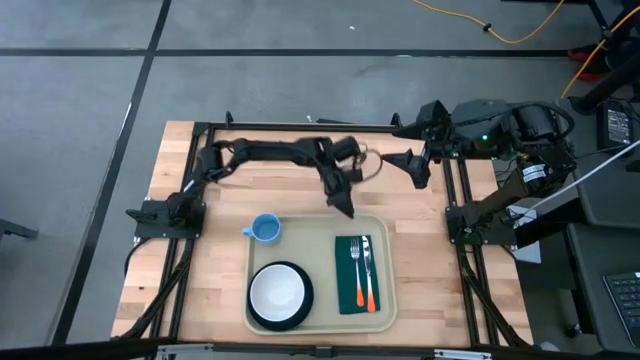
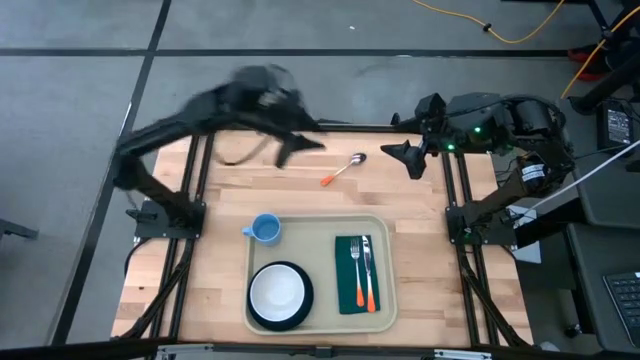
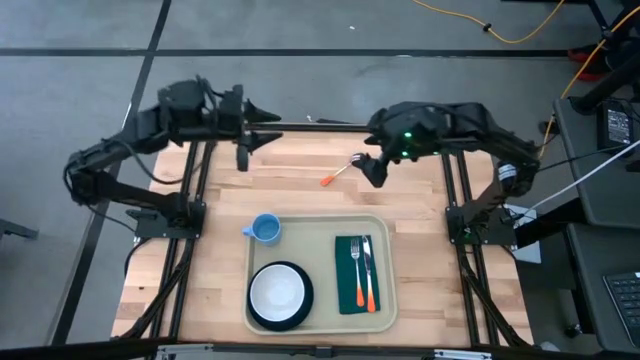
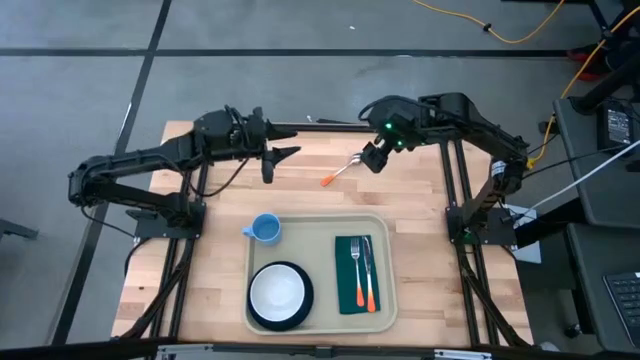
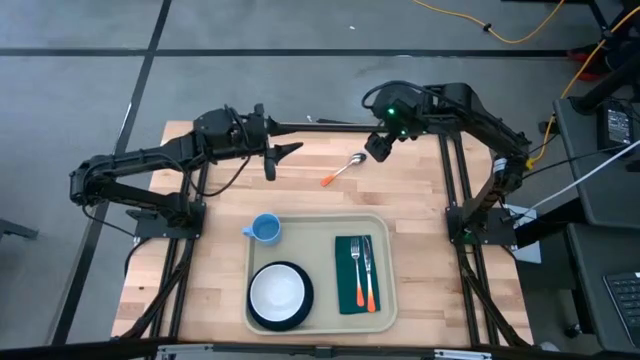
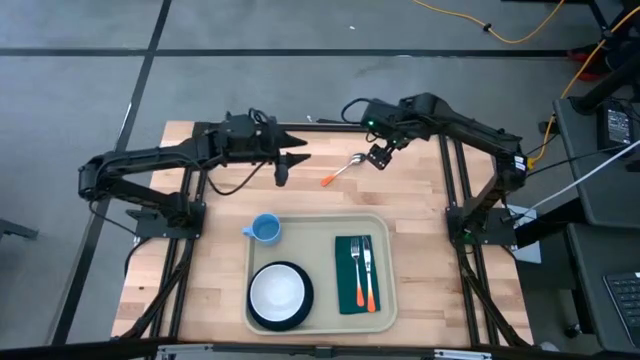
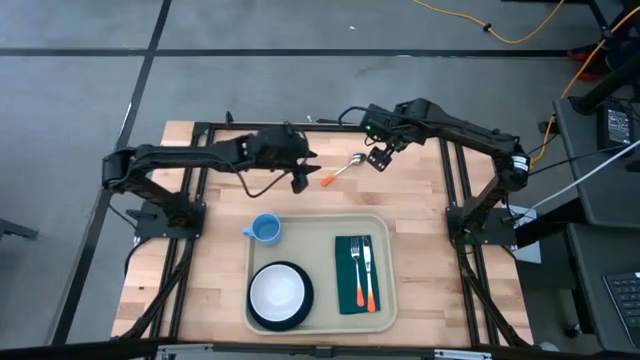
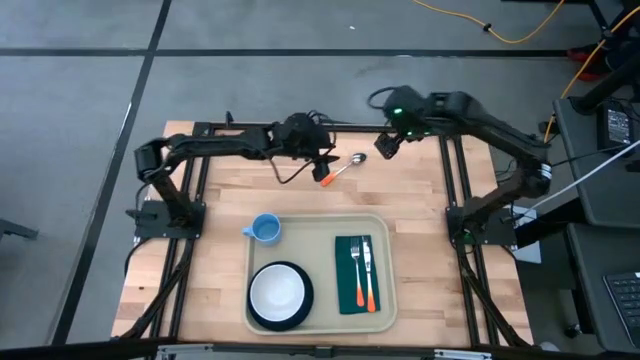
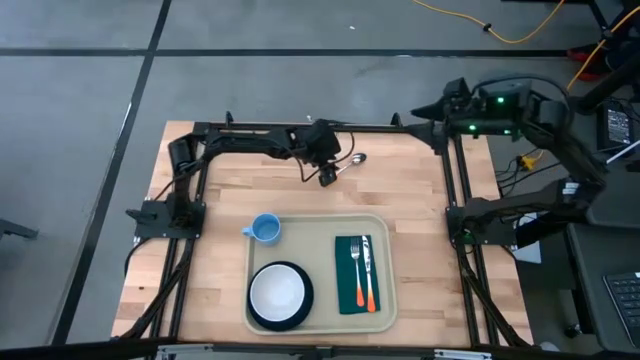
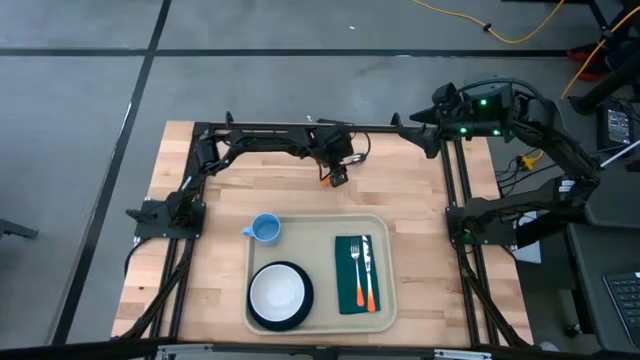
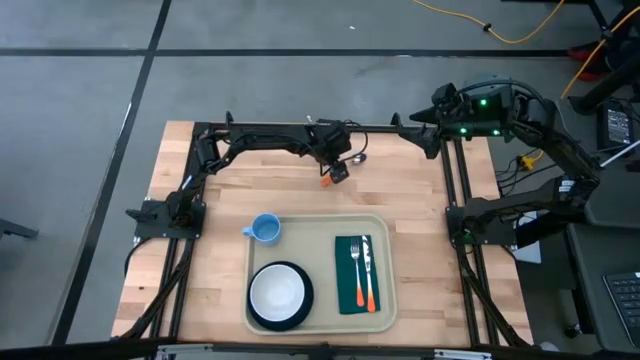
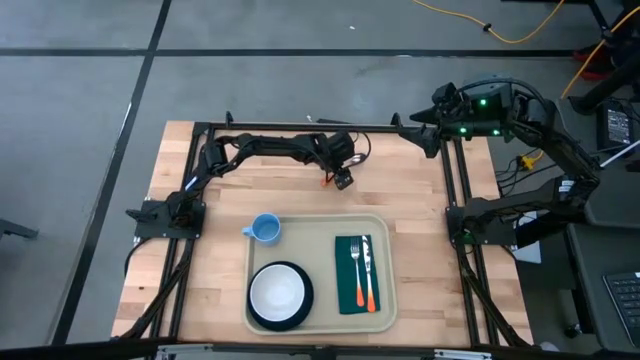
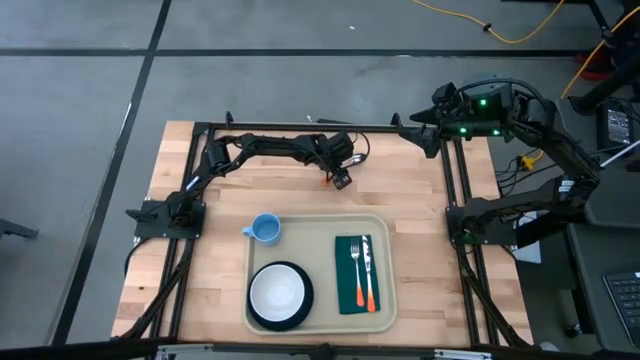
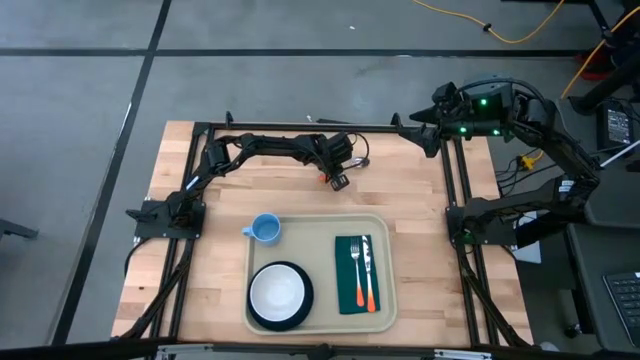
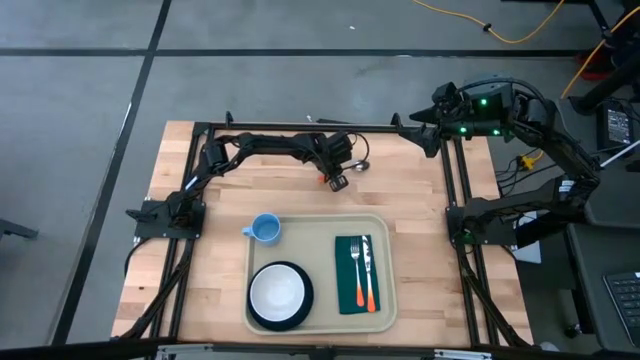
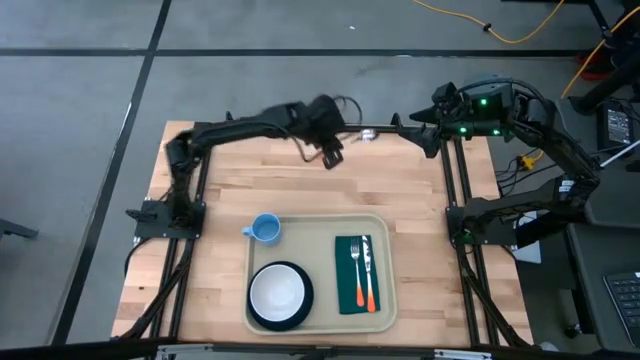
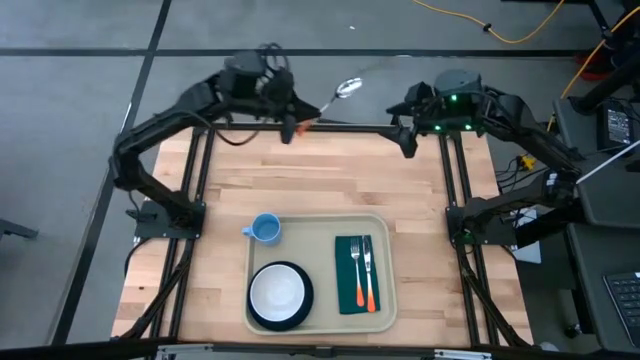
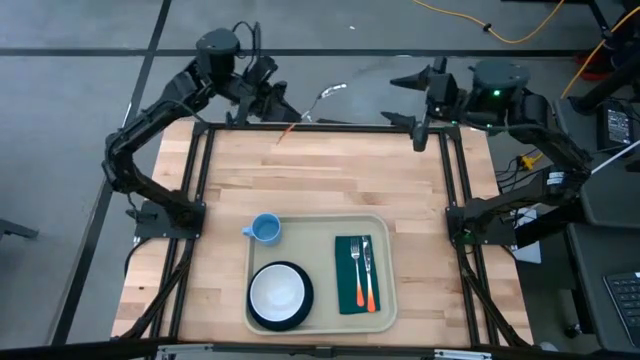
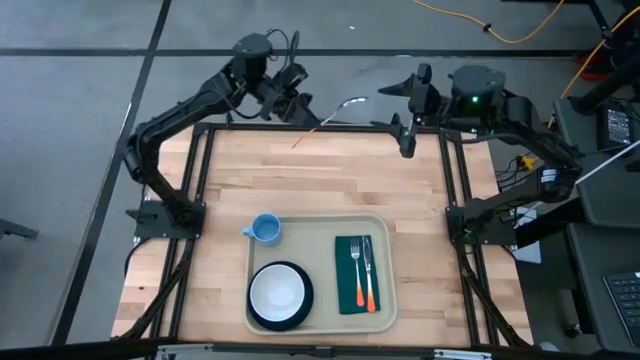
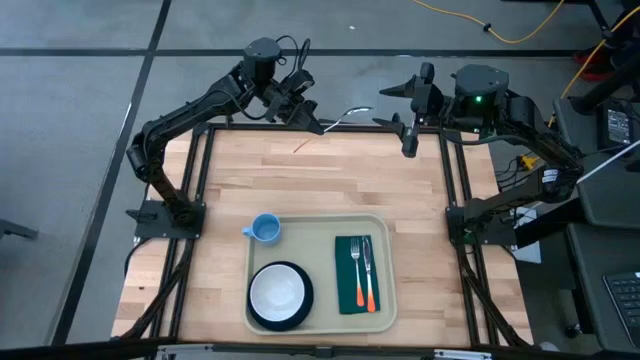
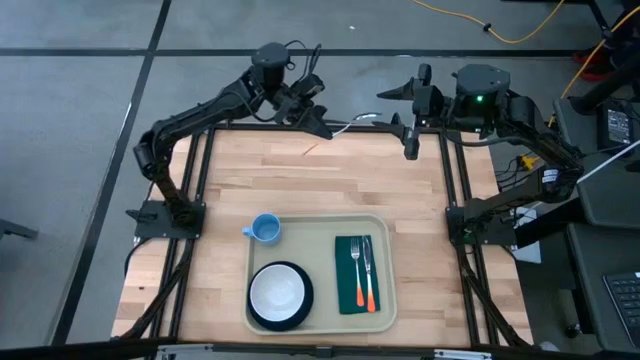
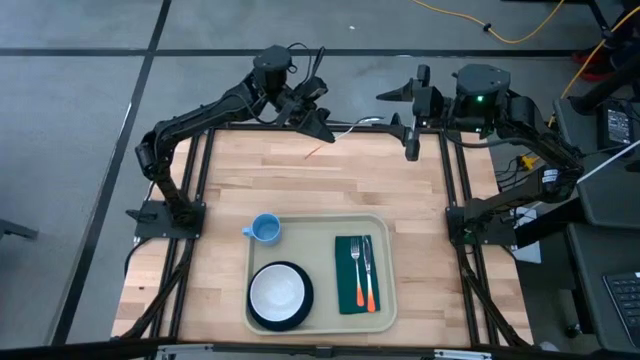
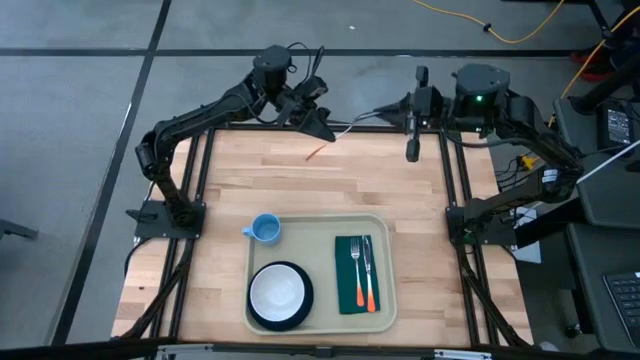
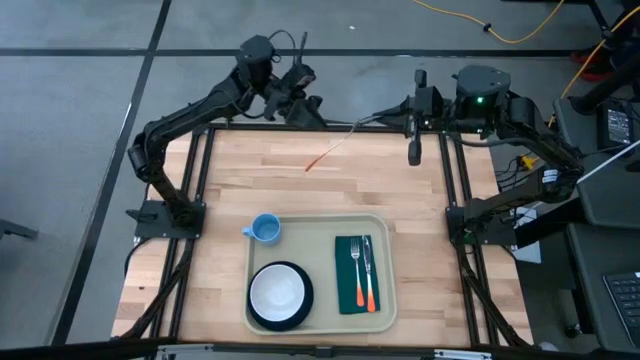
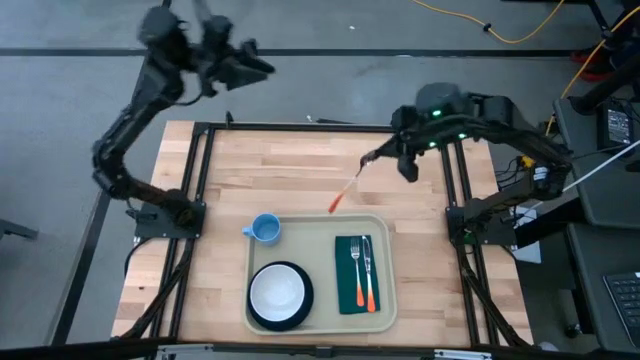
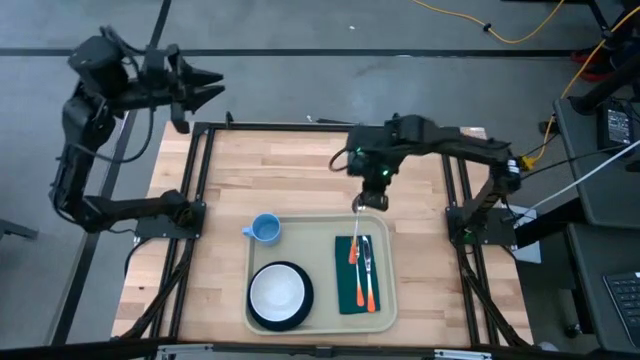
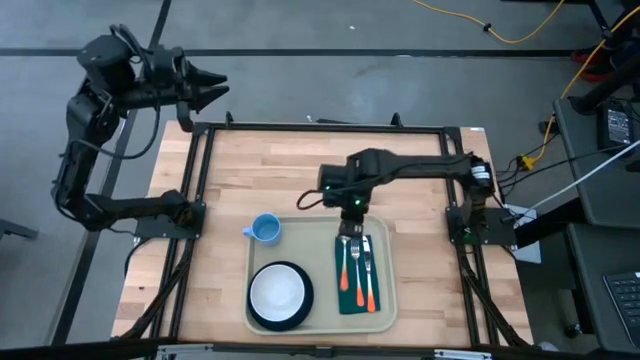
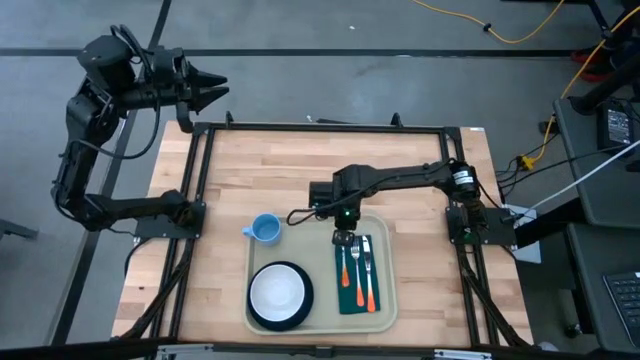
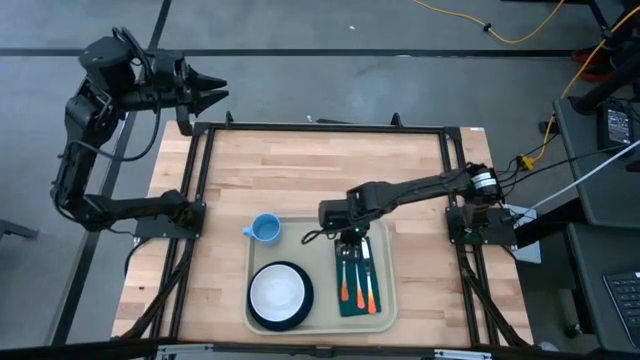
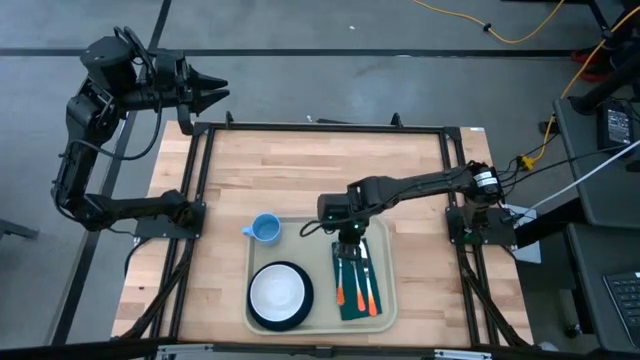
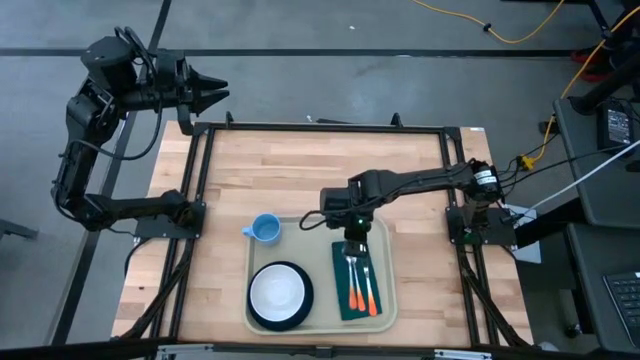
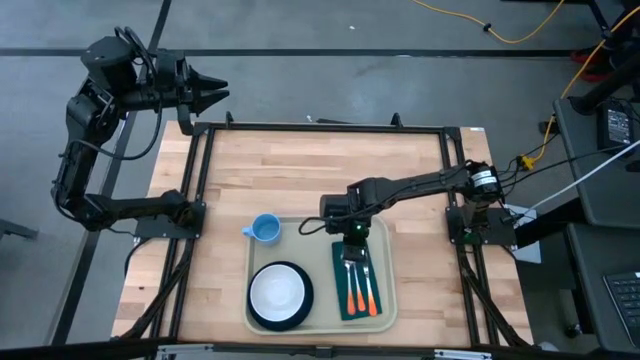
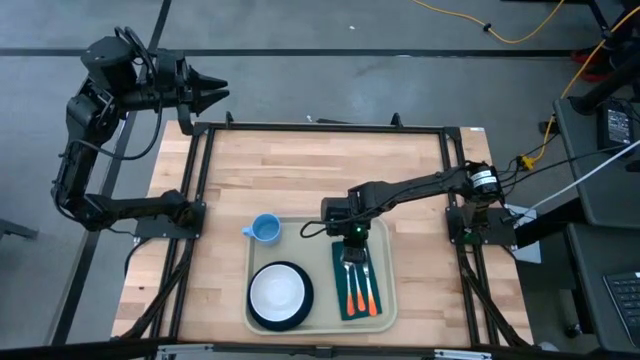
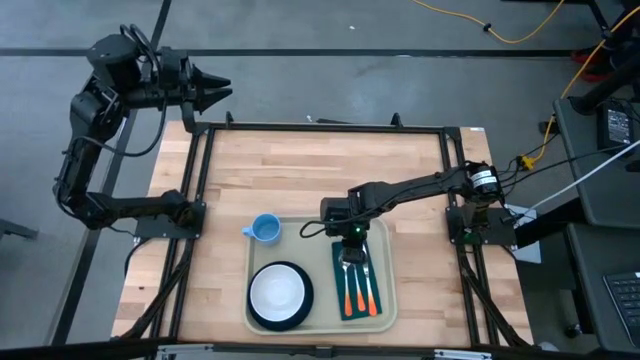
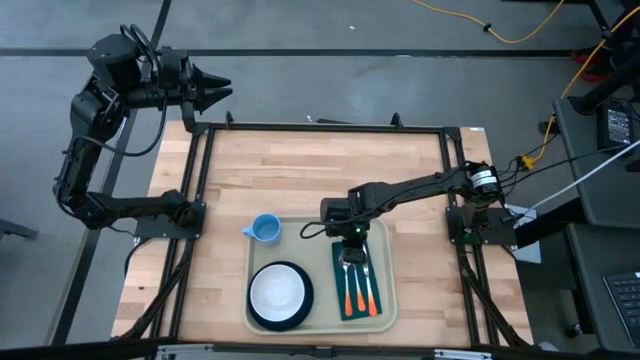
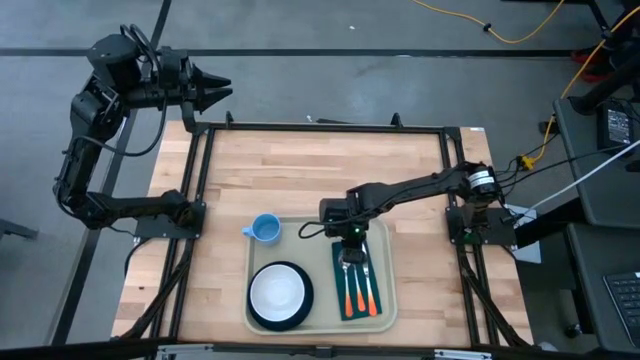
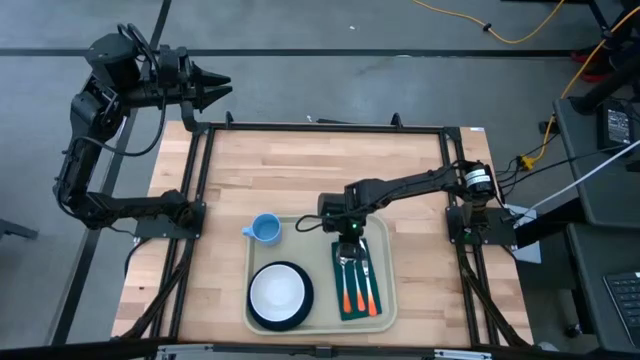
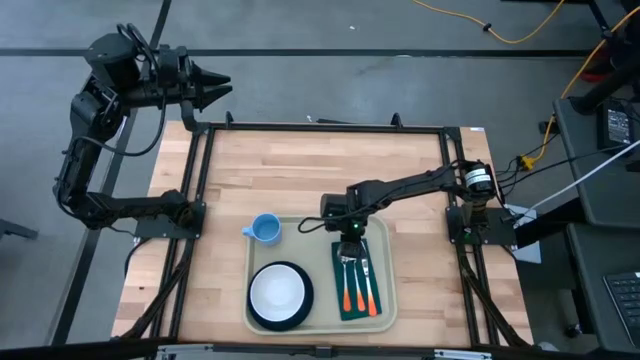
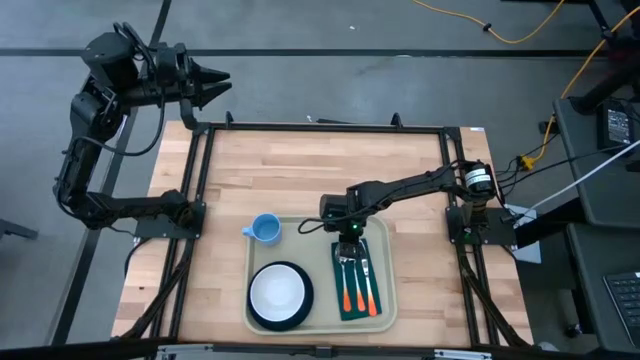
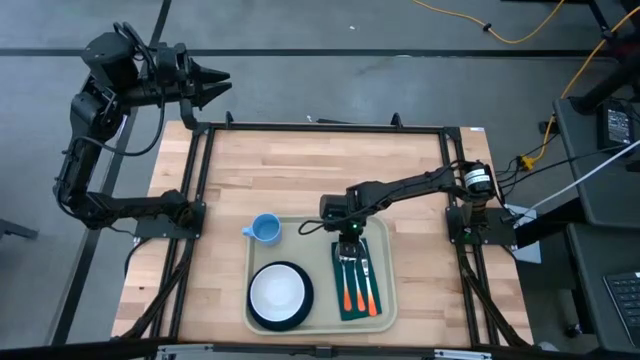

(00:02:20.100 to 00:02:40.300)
Task: Set up tray
Put the orange spoon on top of the green napkin to the left of the orange fork

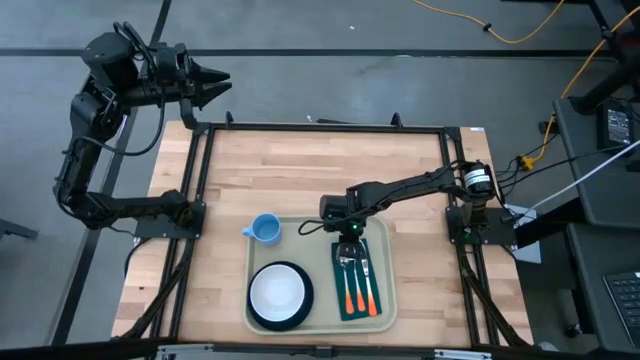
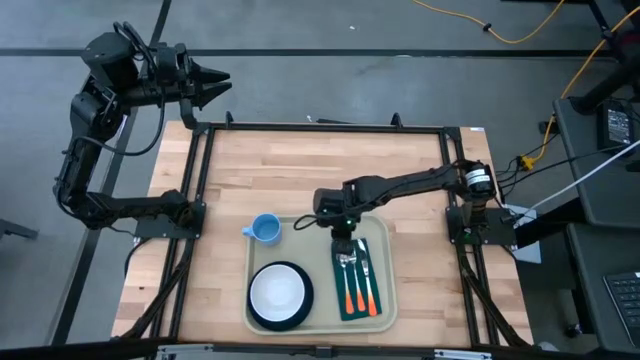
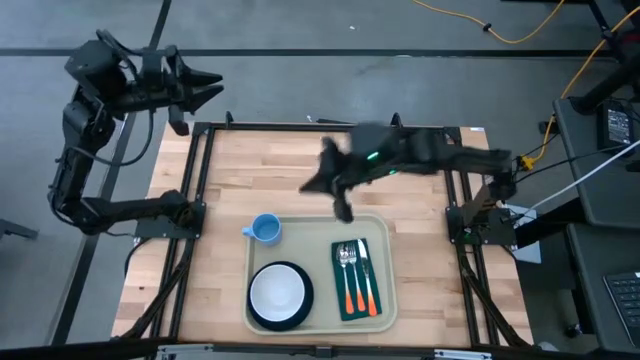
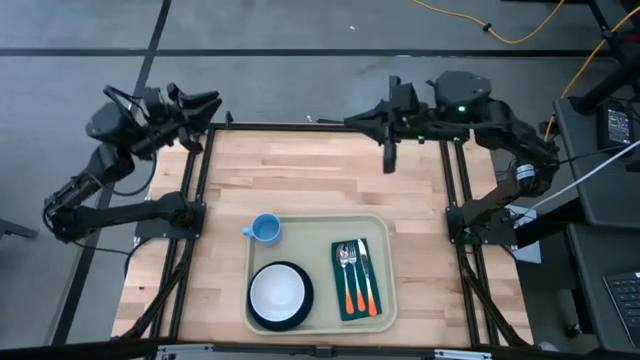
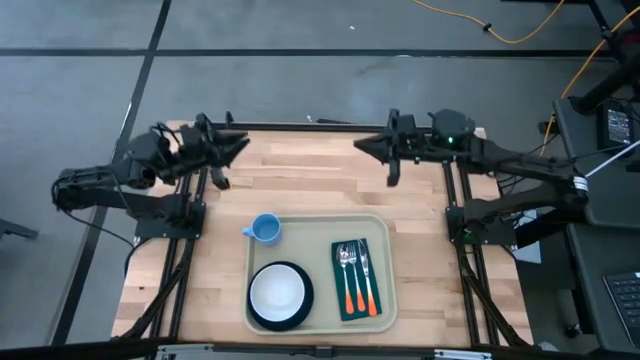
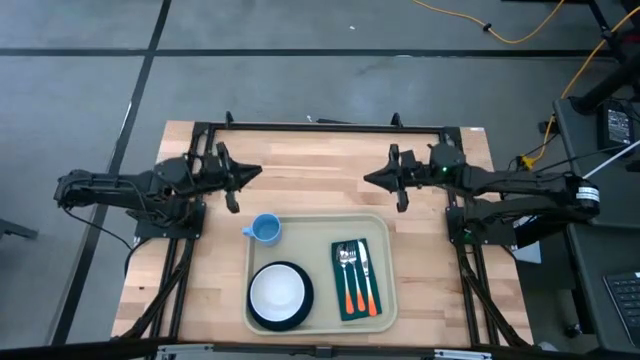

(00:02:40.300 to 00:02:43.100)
Return to Home Position
